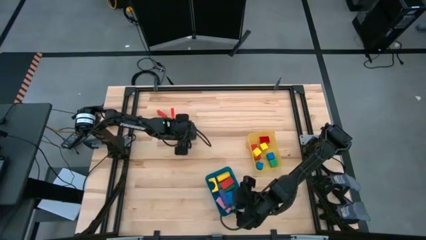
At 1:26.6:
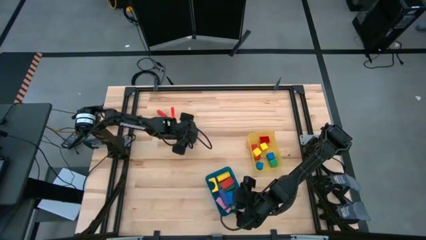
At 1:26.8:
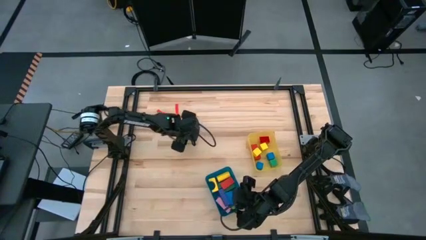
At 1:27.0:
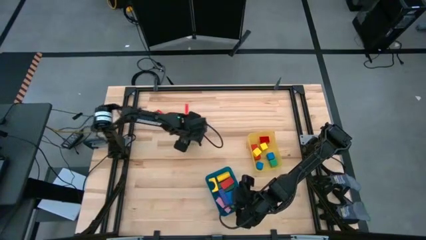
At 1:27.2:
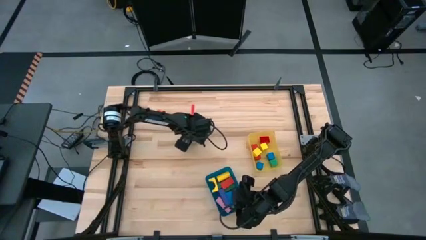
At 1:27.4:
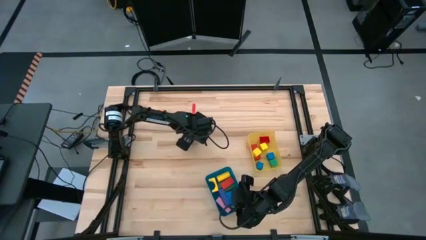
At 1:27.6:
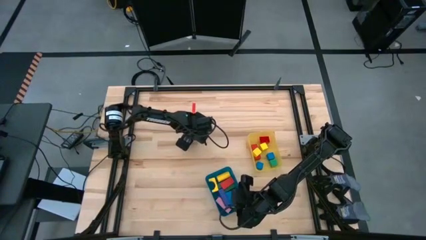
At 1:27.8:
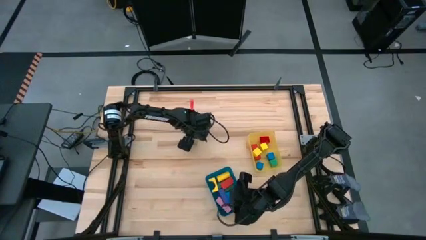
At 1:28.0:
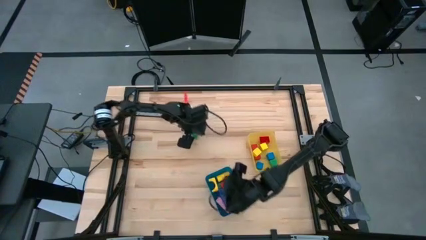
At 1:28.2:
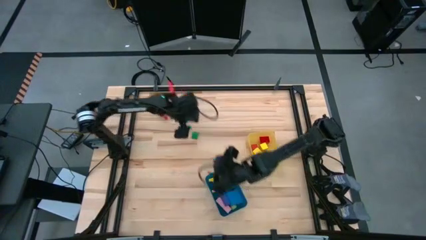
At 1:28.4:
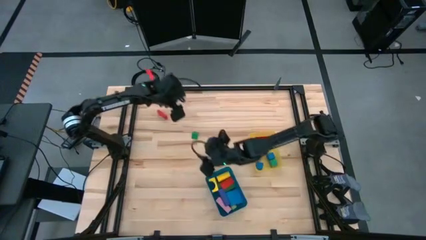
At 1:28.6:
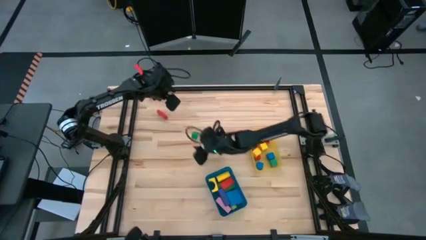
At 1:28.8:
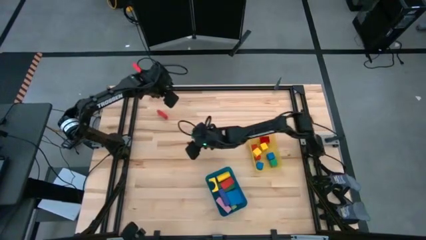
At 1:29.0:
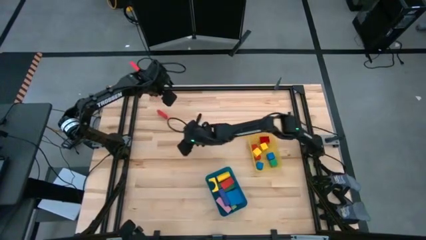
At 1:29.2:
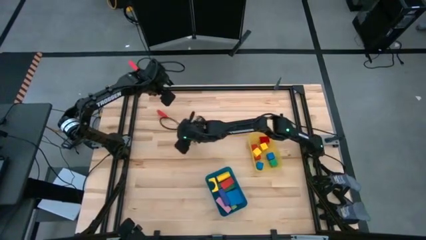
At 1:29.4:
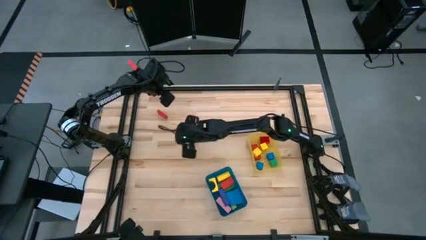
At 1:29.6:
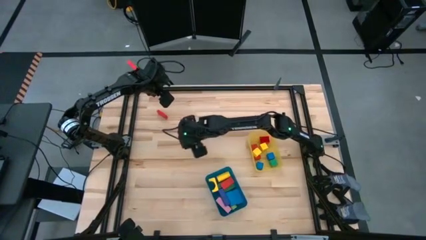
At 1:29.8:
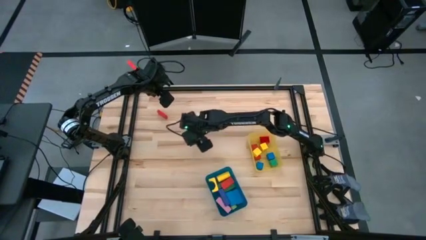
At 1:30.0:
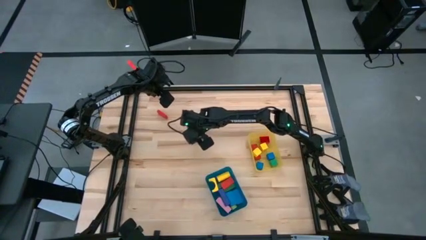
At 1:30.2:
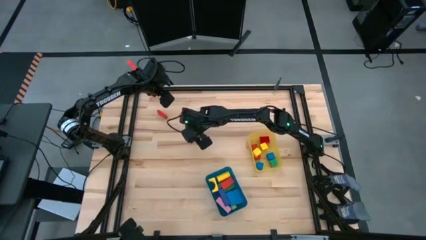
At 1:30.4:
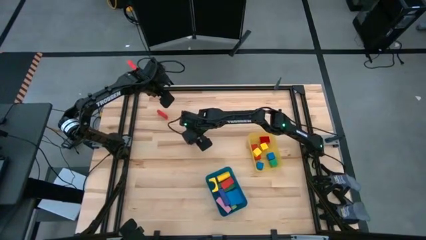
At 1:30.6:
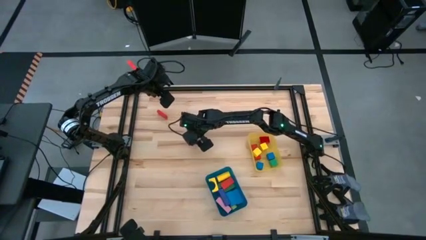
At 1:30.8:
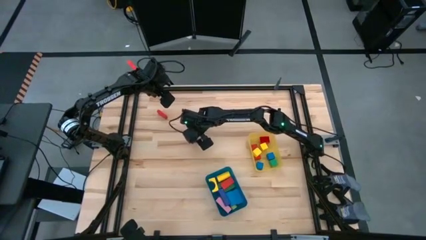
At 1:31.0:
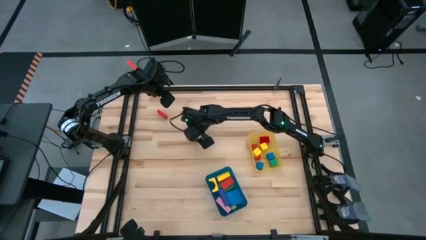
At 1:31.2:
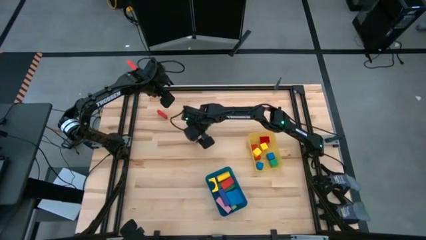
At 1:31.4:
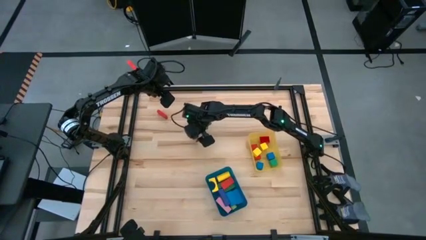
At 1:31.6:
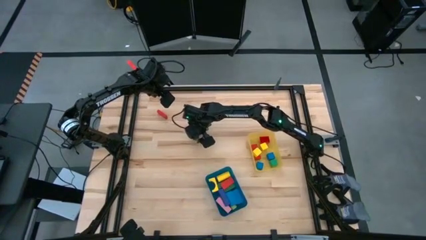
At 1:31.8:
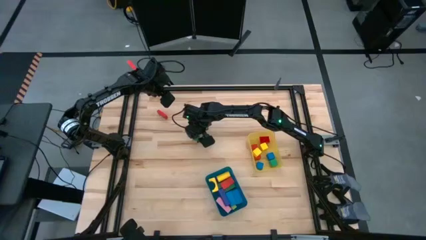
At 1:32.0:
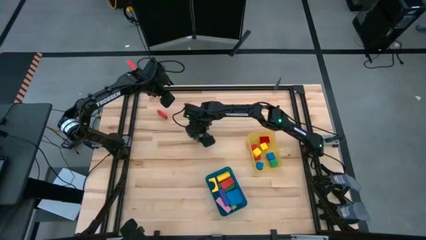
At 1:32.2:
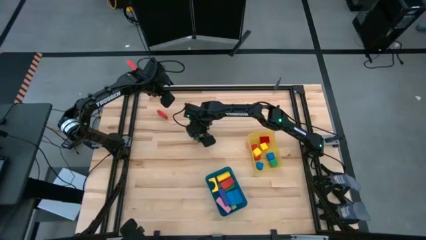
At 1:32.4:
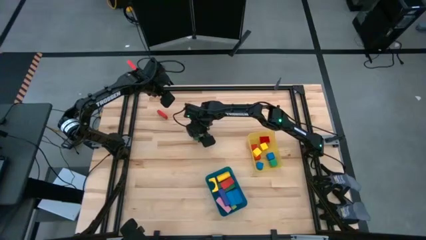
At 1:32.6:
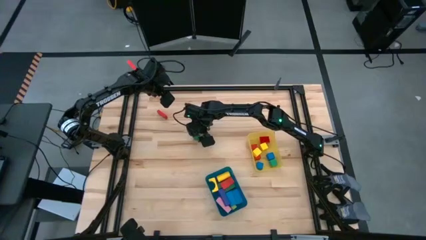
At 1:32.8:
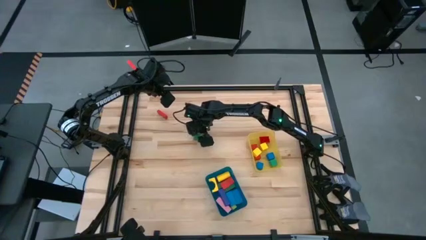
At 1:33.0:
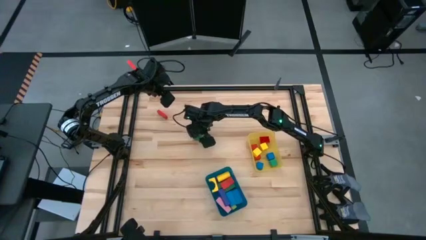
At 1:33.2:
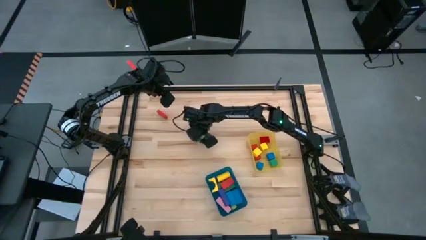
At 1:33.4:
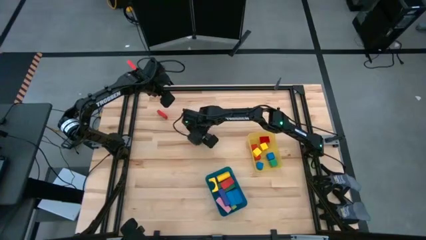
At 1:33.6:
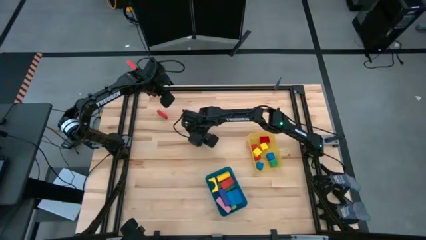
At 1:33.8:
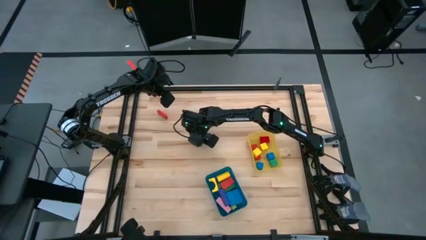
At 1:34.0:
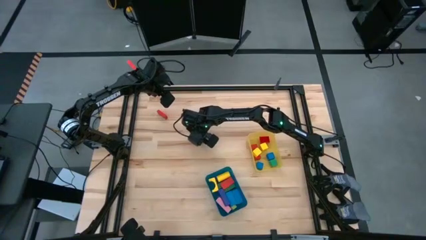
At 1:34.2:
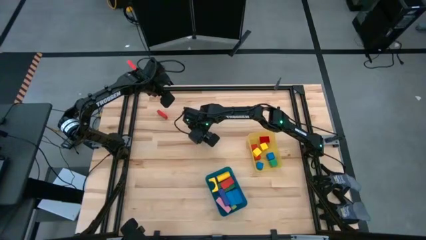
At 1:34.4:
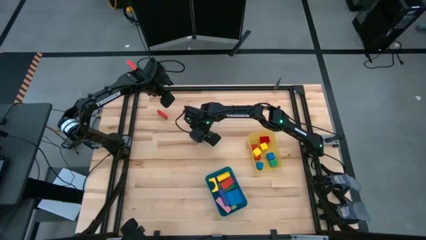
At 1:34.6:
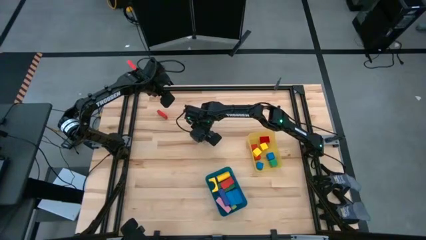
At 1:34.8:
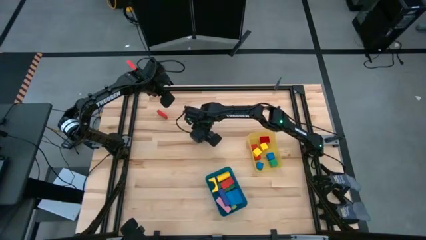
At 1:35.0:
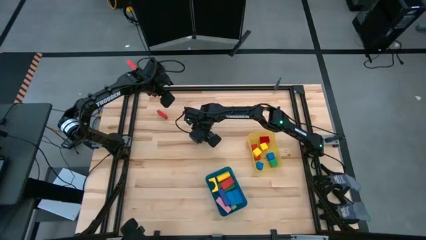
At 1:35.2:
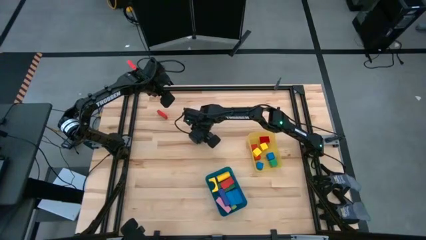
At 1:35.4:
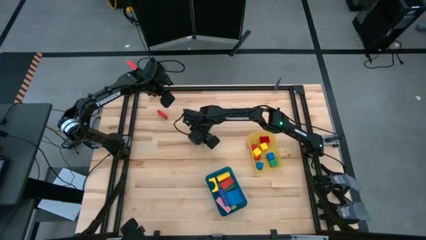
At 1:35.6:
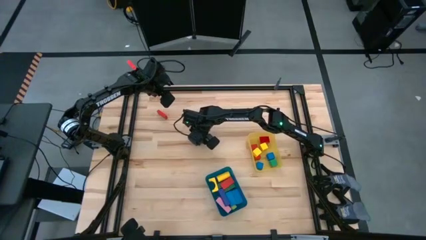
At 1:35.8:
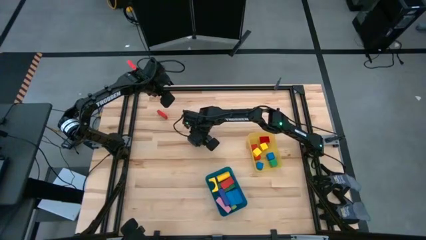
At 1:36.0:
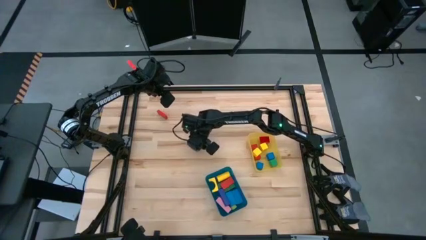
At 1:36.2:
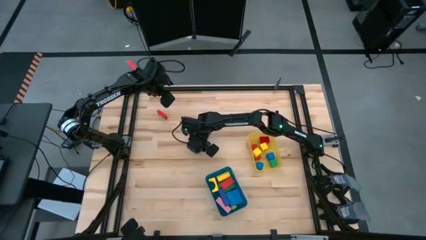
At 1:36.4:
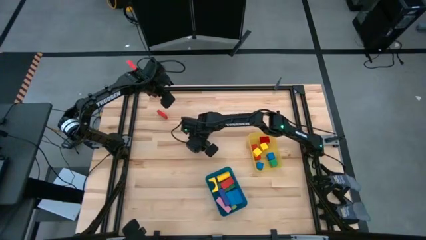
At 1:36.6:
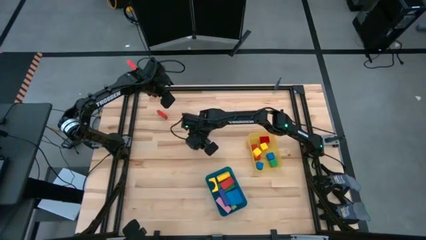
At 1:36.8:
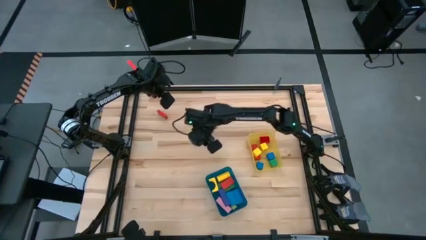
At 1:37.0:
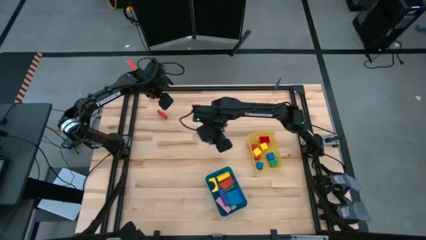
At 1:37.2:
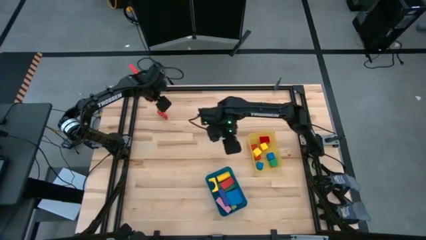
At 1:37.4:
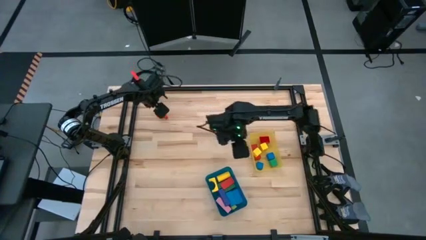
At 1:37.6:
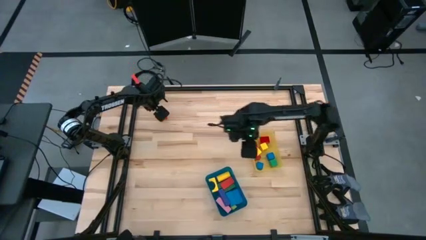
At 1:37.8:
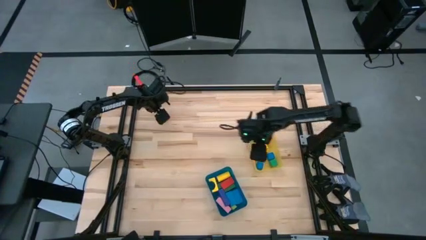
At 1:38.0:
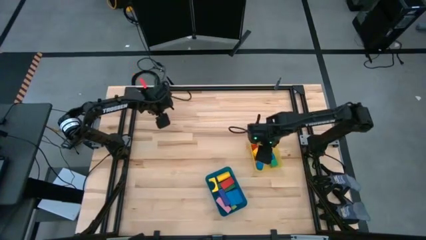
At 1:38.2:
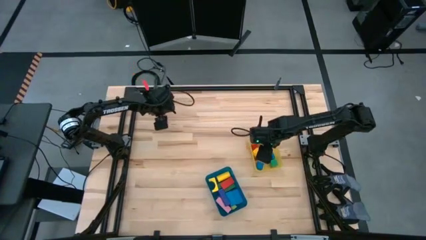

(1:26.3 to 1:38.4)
Task: Sort blocks by size
Put the small green block into the yellow bin

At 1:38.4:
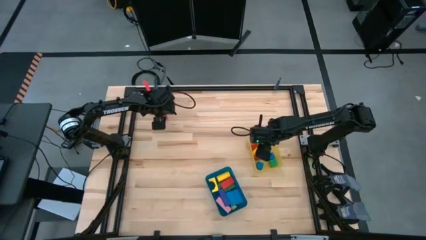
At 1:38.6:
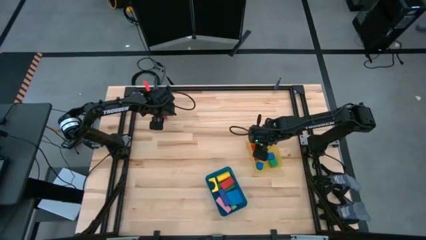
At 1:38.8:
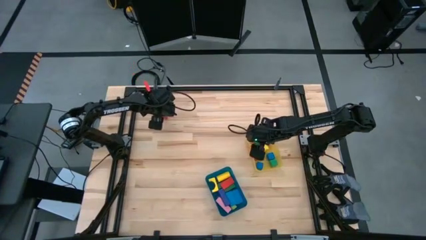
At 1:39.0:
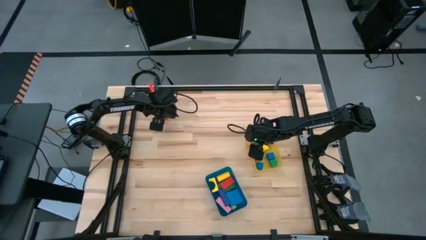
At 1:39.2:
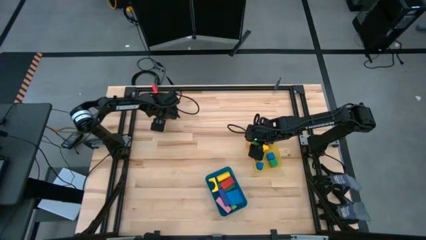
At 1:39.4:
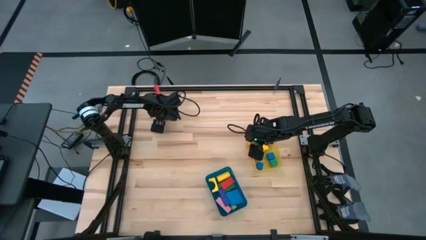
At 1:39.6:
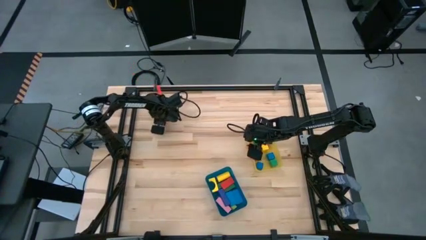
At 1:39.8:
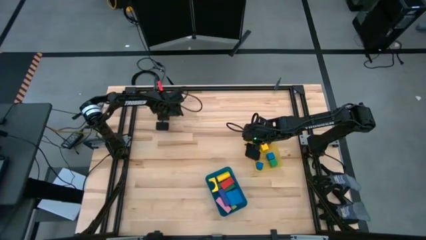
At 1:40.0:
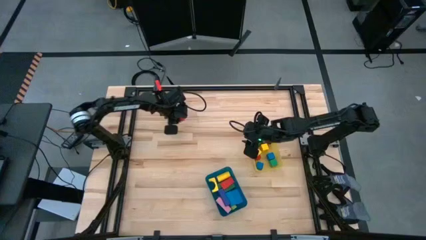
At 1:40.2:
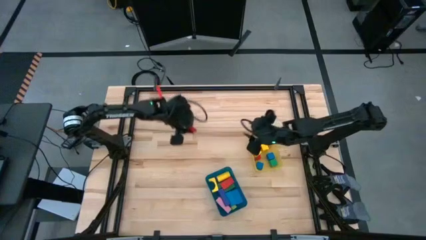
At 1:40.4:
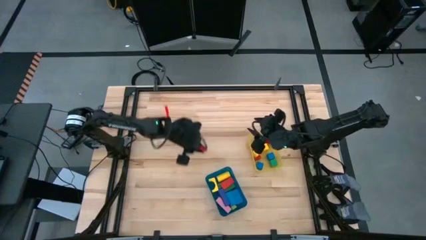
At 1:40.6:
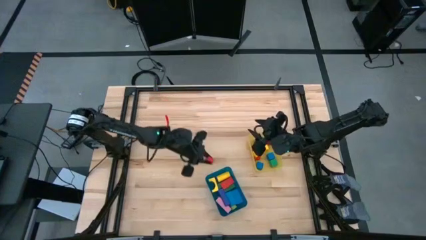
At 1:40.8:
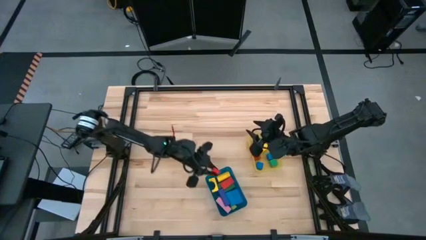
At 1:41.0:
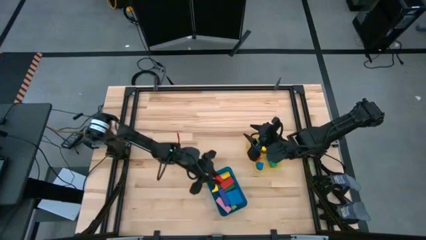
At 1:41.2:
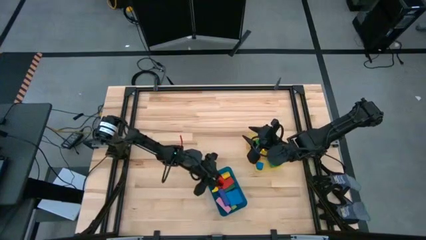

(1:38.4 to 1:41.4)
Put the large red block into the blue bin
